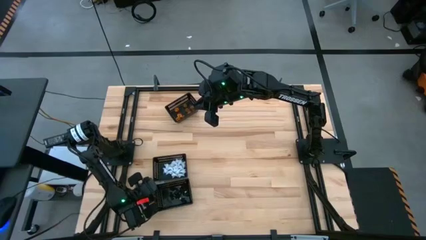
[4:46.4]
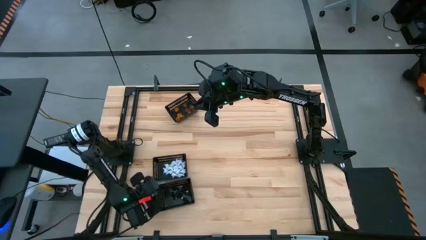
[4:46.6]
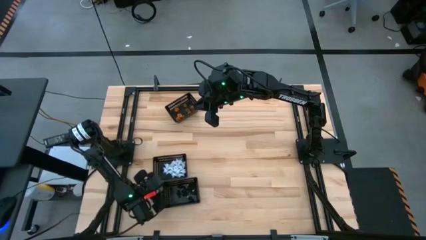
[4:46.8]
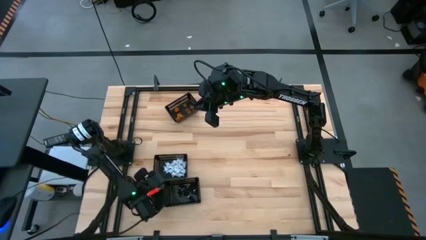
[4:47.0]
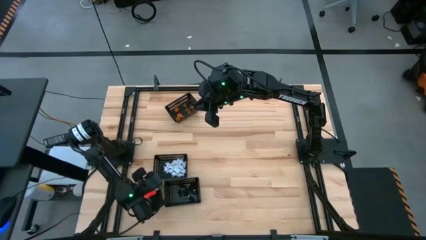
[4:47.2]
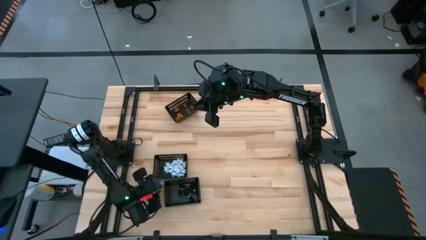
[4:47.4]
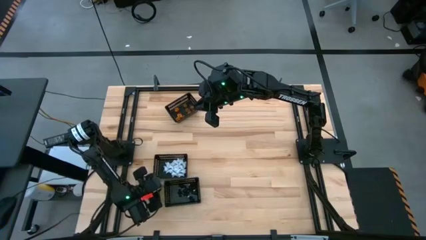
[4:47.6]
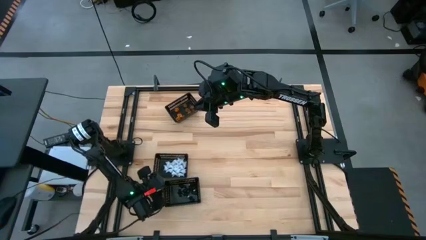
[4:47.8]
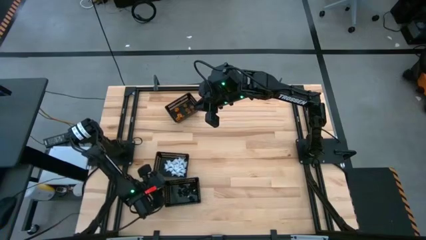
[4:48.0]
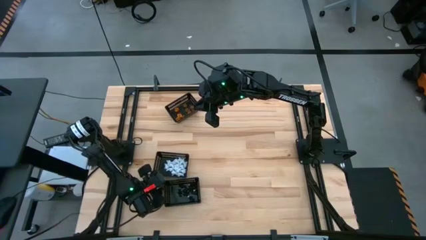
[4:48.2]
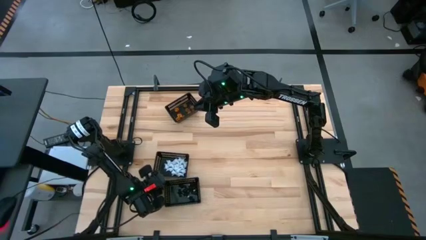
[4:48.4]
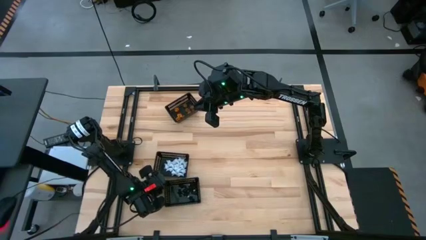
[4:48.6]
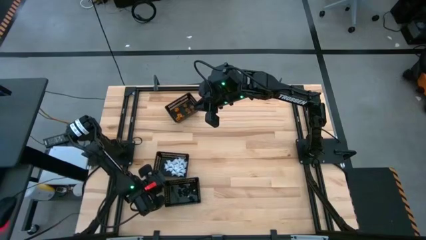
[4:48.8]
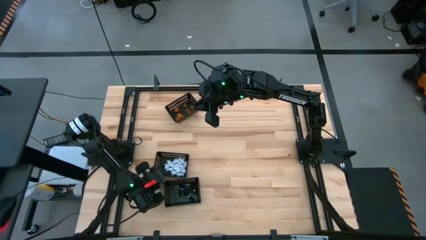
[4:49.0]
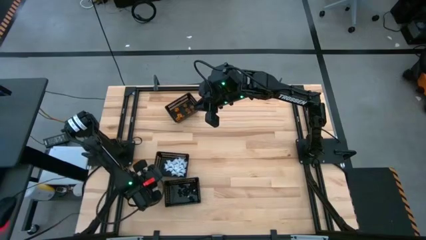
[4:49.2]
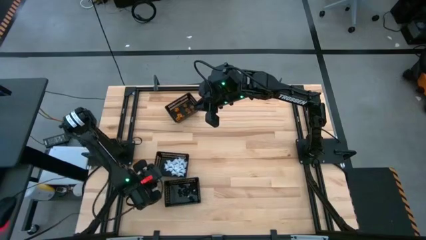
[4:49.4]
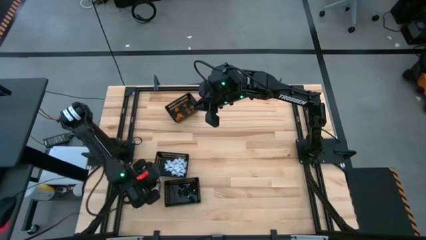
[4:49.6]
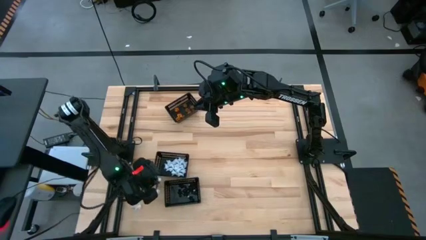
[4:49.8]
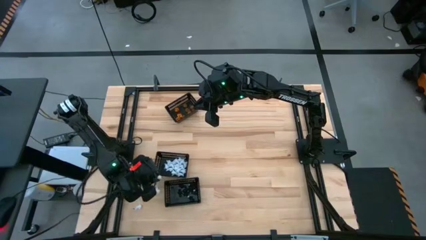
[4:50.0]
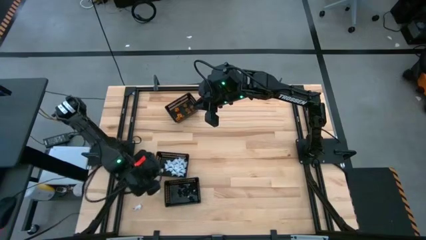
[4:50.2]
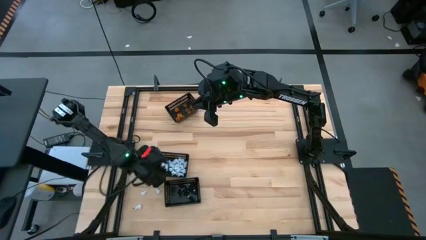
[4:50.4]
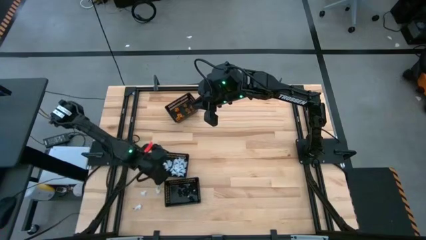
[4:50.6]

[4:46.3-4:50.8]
Task: Sort Halloween decoration
Put the white toy into the middle black bin

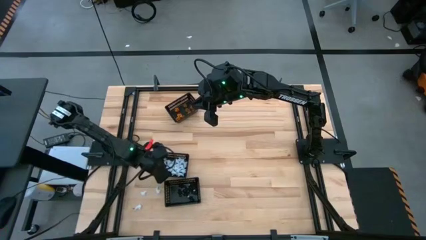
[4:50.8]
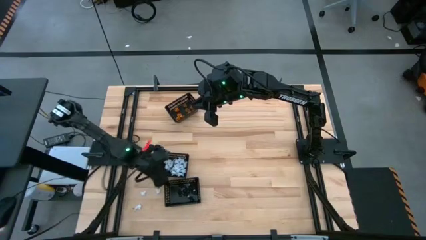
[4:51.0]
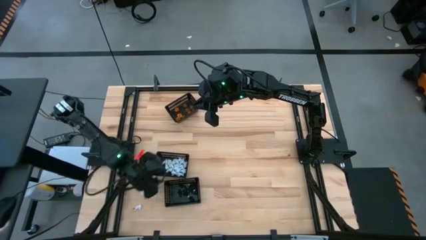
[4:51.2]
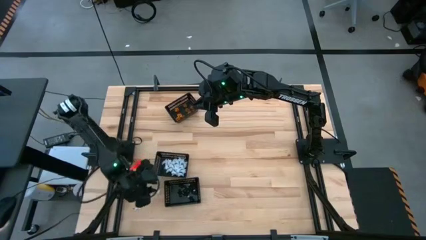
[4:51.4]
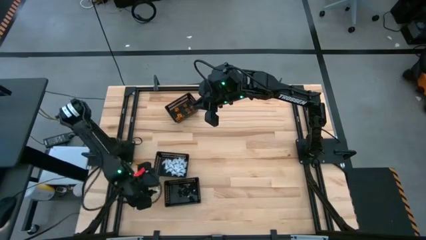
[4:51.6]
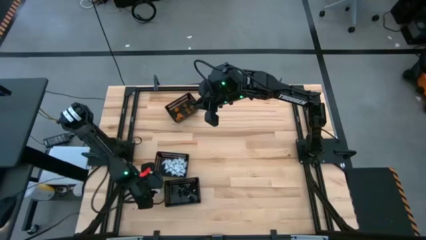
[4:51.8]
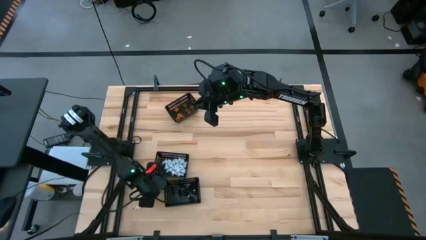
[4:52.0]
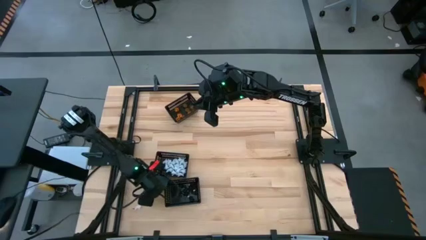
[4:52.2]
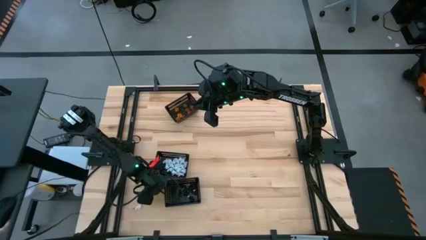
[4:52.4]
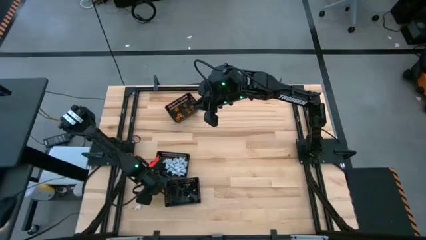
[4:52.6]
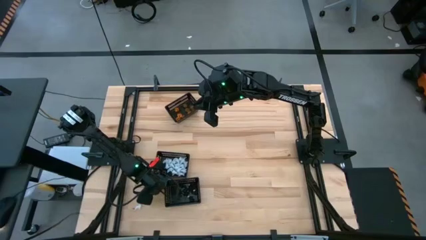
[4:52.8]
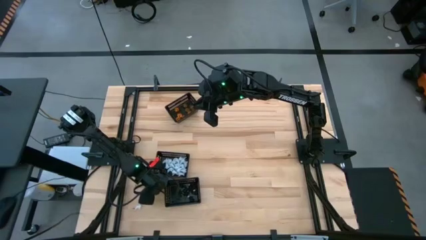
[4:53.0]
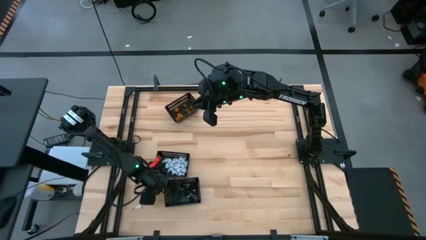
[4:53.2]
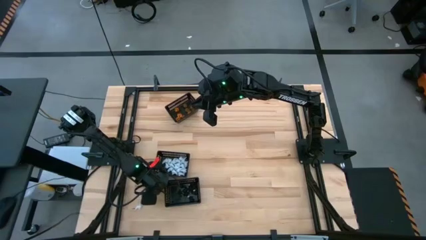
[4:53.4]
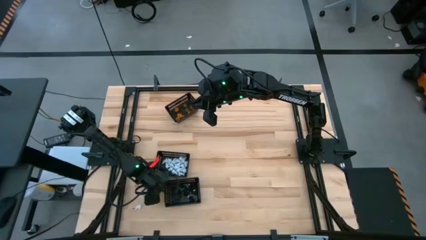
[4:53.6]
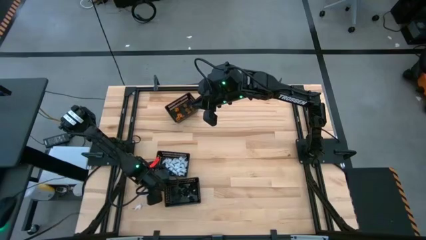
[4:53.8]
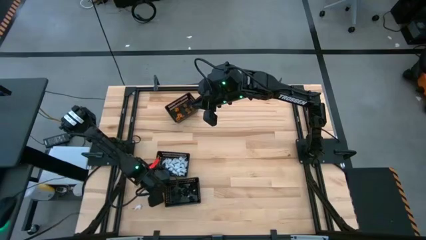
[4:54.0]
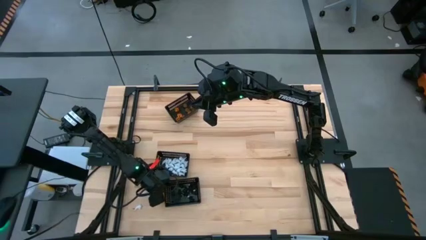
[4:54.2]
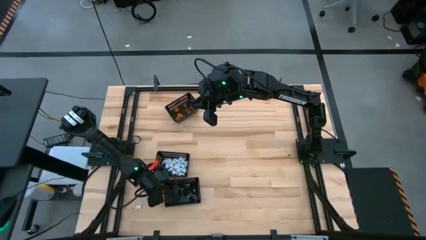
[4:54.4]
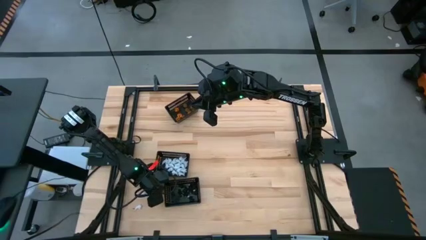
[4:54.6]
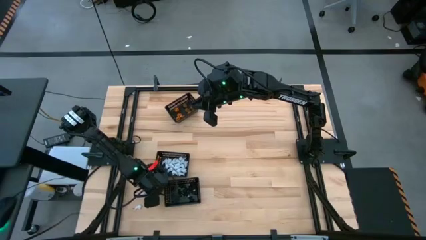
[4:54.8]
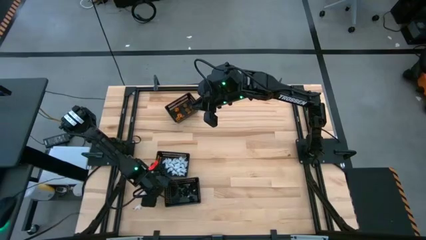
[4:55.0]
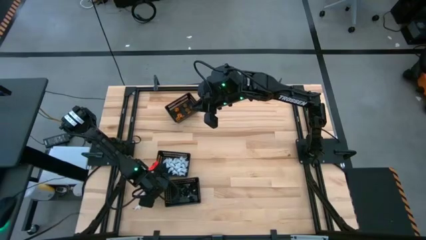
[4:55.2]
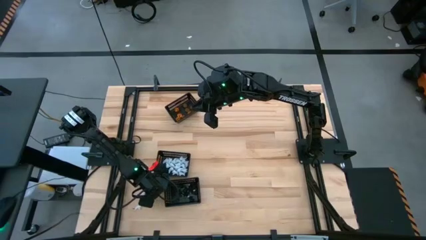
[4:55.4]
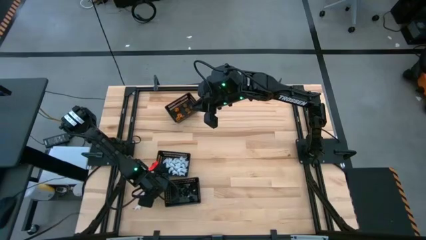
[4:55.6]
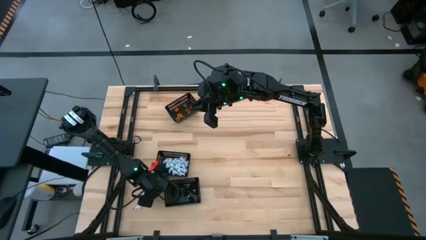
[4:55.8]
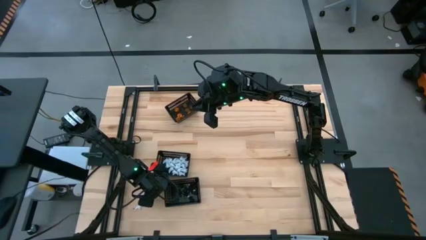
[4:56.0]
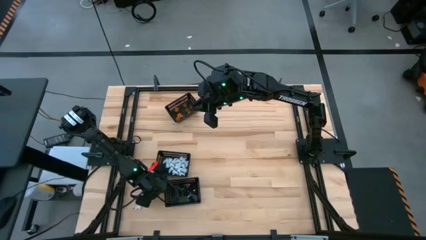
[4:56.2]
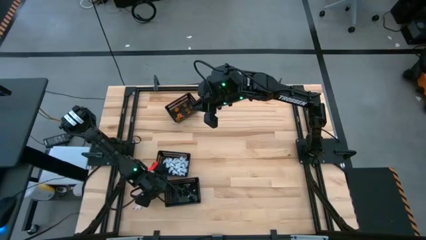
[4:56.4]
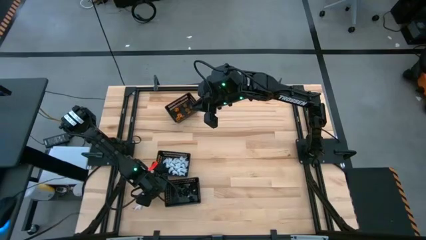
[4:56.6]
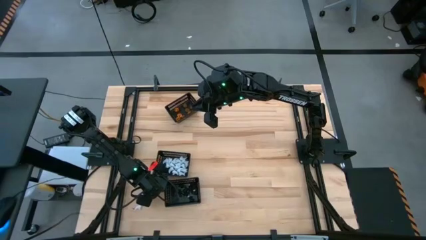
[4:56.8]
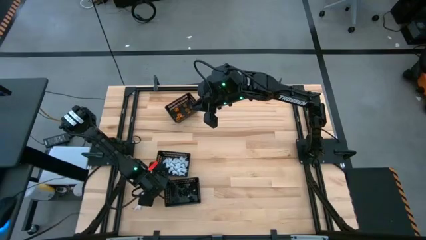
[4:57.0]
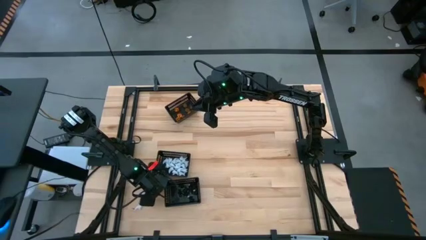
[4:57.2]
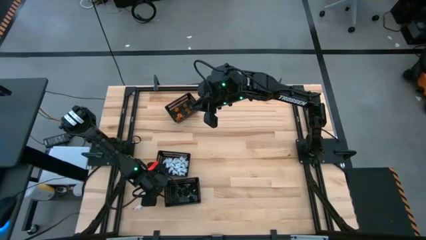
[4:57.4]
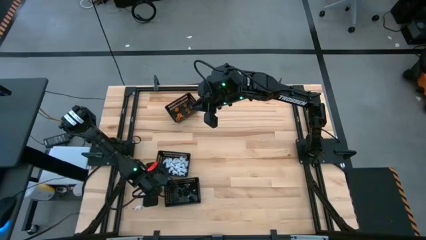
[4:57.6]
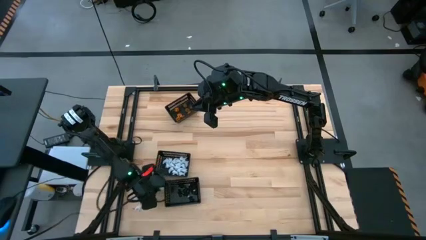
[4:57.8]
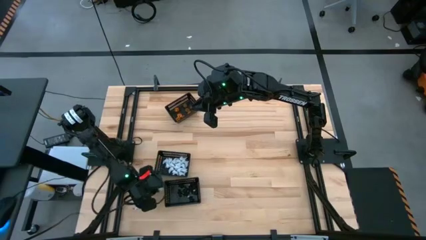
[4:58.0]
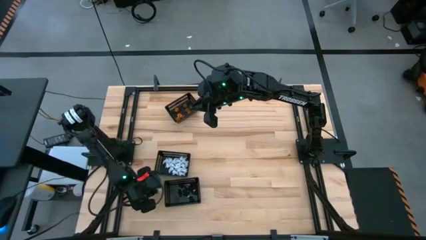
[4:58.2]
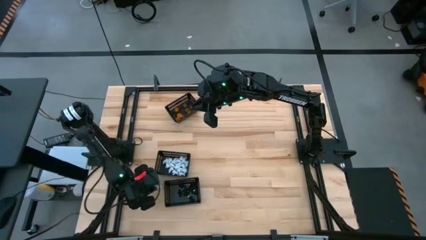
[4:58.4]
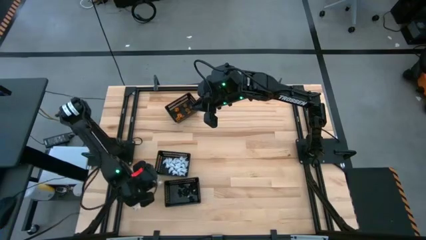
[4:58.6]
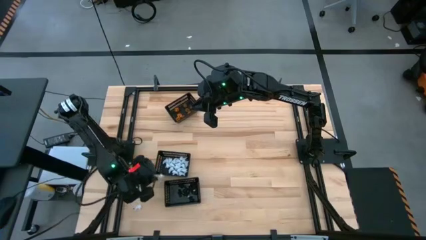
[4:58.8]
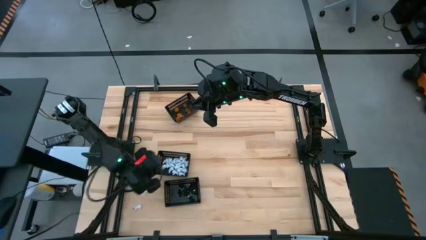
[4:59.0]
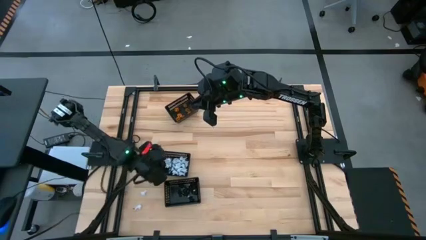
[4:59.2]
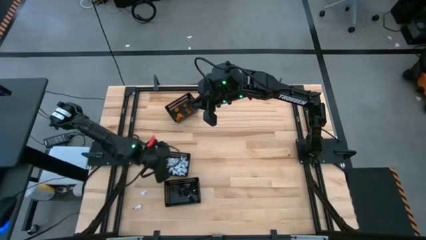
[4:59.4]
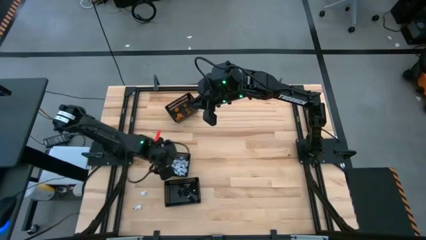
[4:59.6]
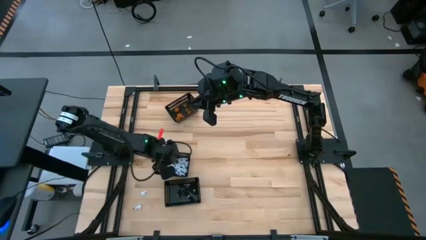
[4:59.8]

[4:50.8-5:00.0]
Put the top right white toy into the middle black bin

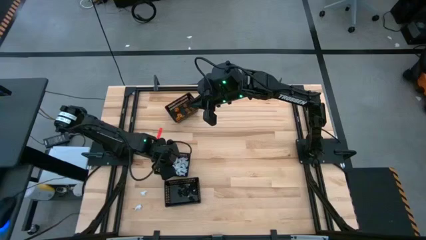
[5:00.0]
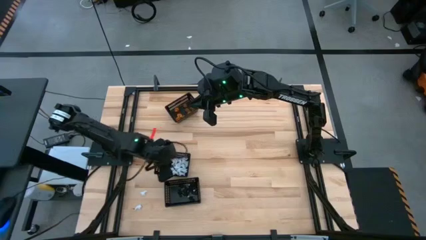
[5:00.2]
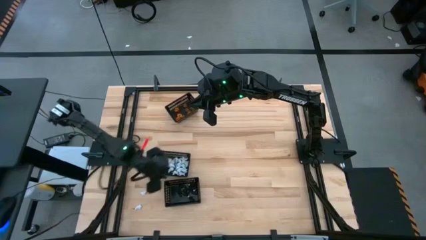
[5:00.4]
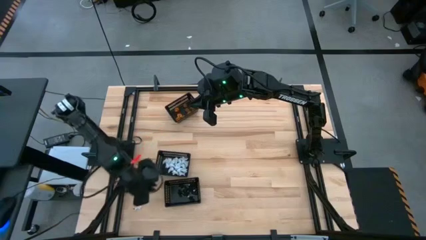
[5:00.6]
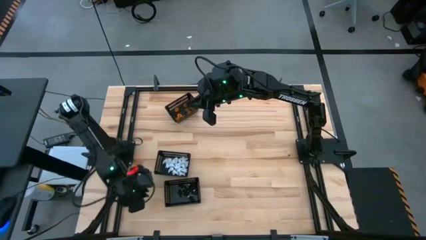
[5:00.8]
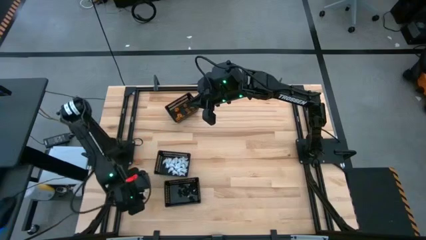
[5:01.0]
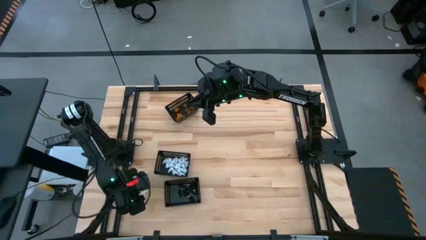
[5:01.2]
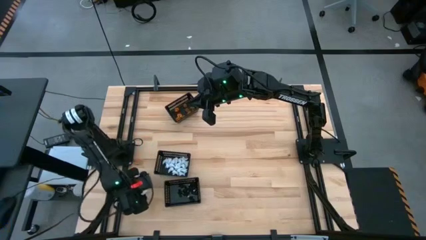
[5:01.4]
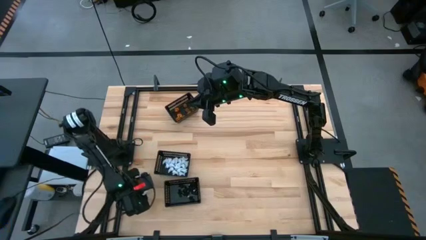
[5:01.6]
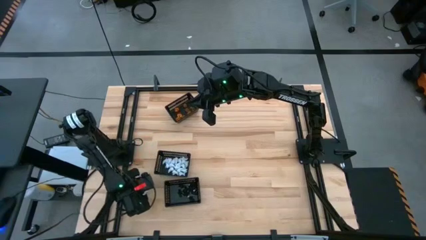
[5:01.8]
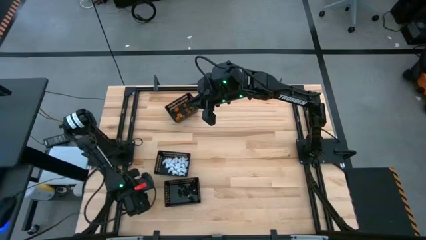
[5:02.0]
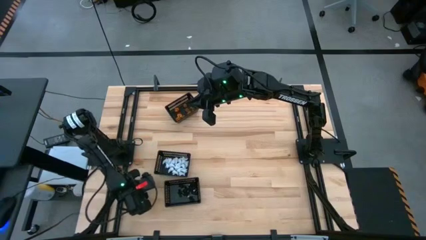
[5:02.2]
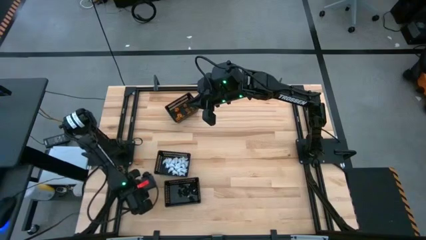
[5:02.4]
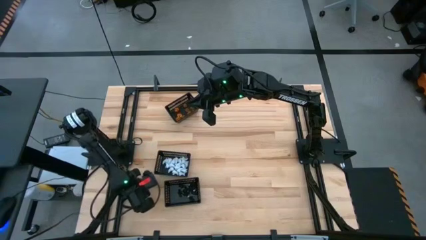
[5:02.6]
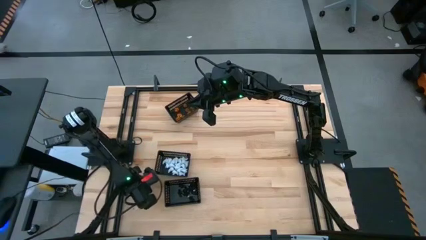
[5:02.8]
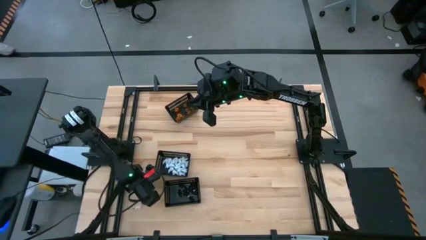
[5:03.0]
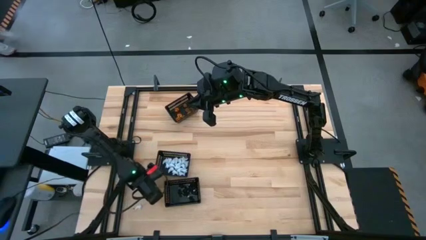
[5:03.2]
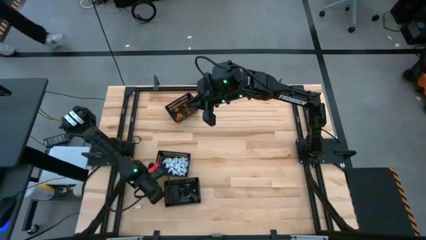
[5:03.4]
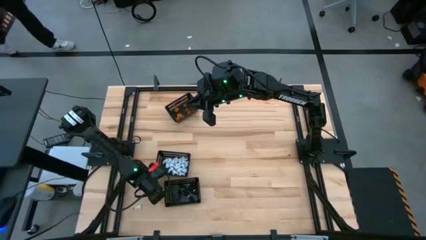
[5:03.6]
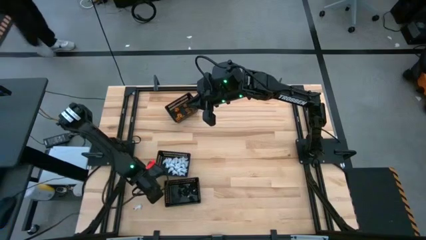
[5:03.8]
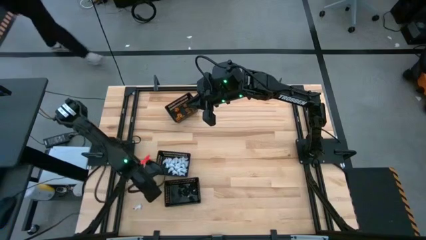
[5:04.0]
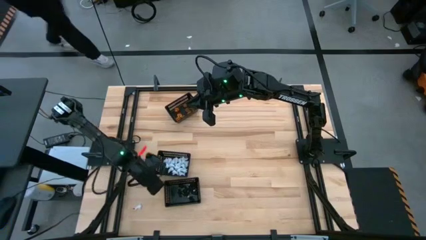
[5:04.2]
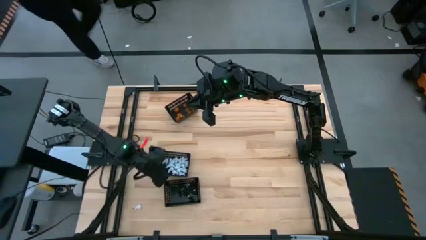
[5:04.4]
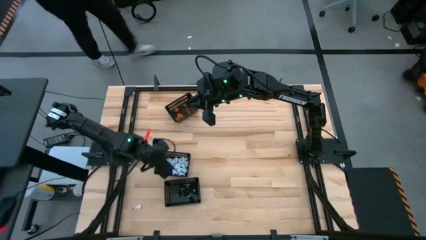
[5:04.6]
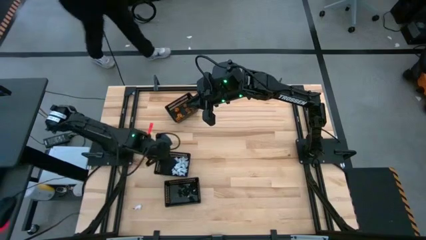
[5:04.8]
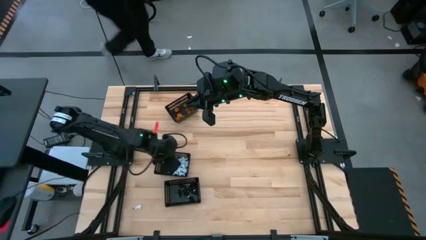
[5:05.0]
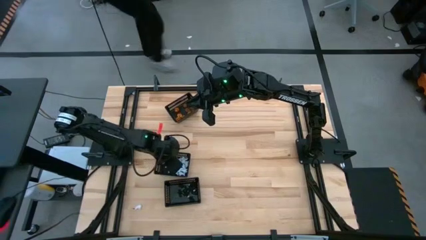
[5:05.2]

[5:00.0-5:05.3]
Put the top white toy into the middle black bin
